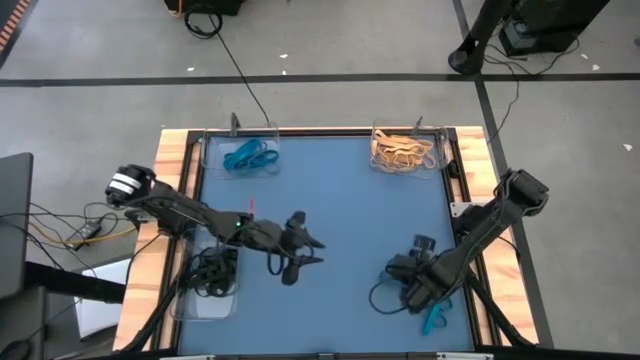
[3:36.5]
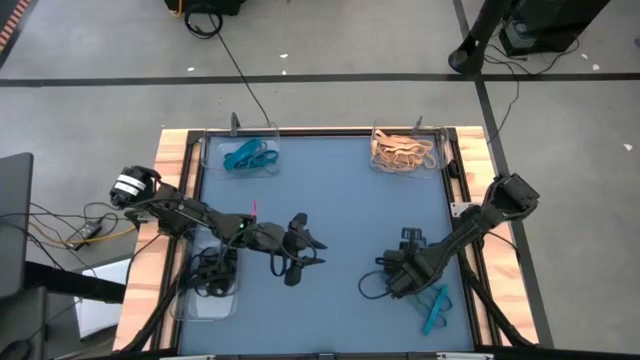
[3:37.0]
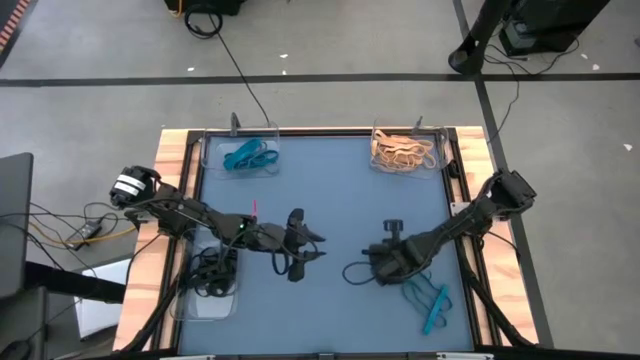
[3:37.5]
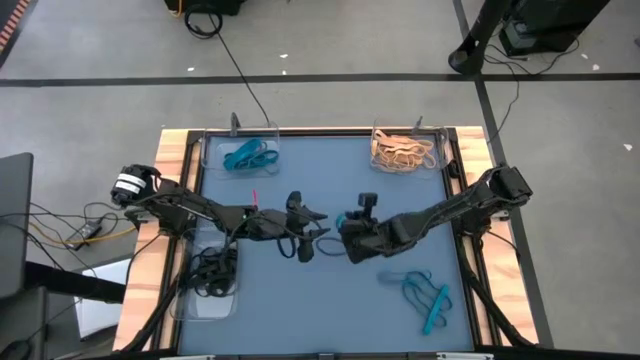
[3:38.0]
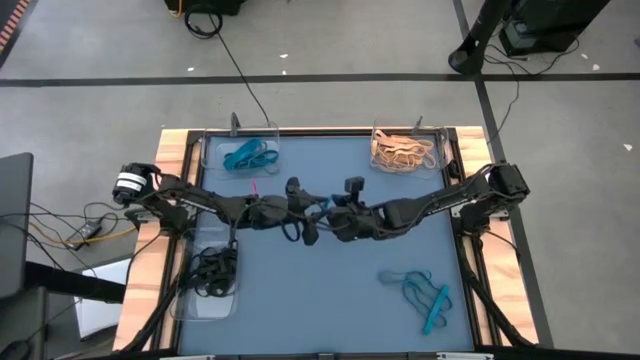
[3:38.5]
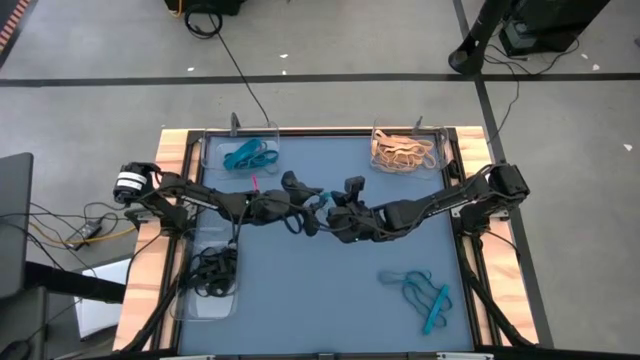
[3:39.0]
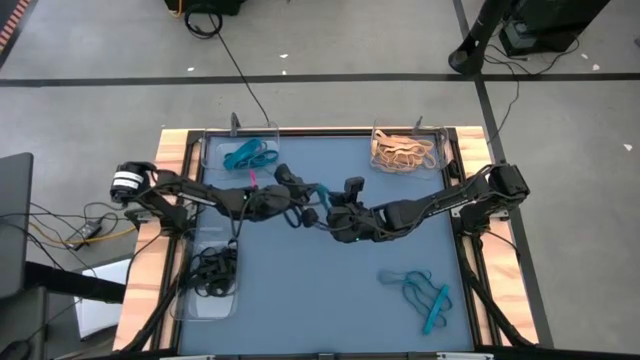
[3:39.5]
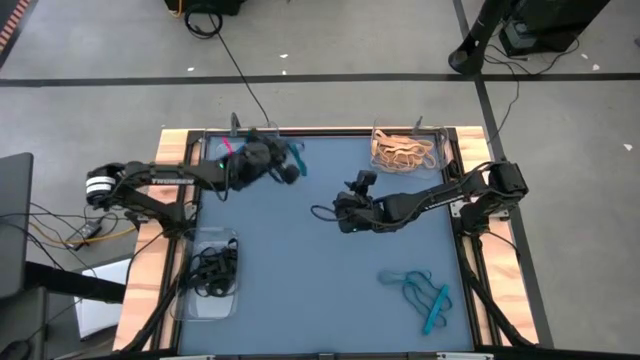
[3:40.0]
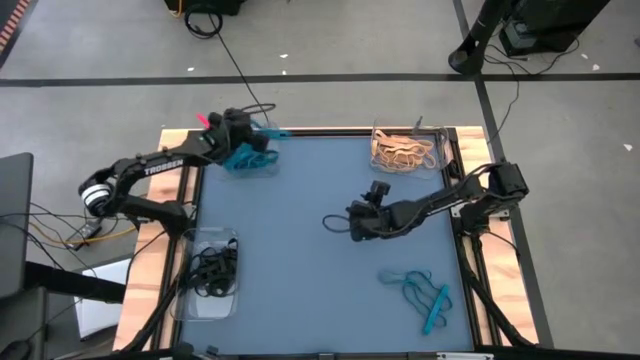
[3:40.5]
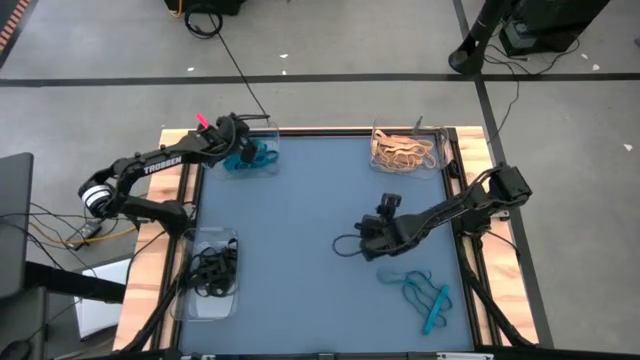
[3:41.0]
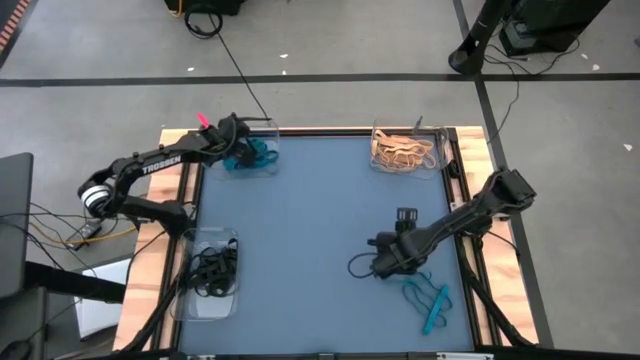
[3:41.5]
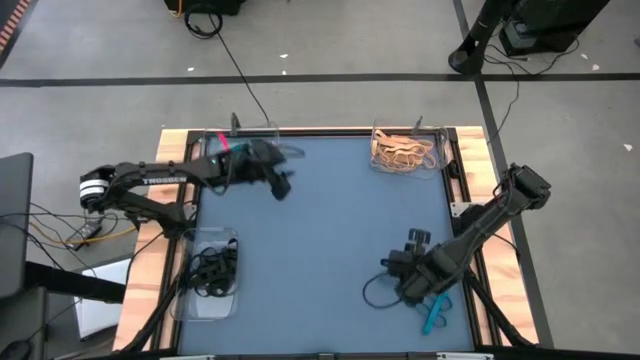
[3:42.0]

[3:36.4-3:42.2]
Task: Sort rubber bands into baskets
Put the blue rubber band into the top left transparent bin

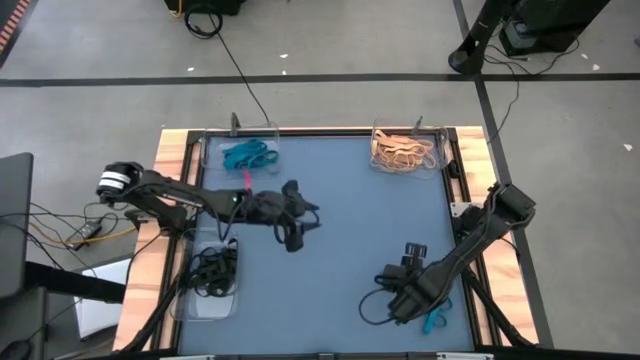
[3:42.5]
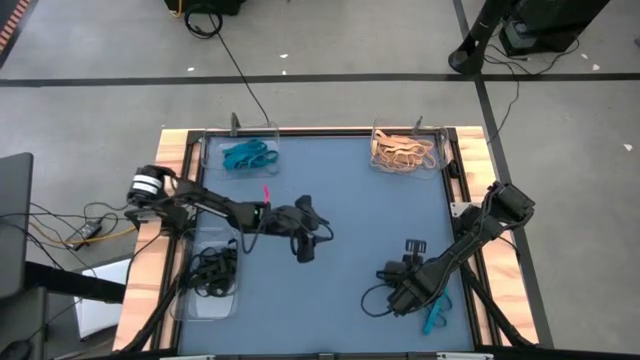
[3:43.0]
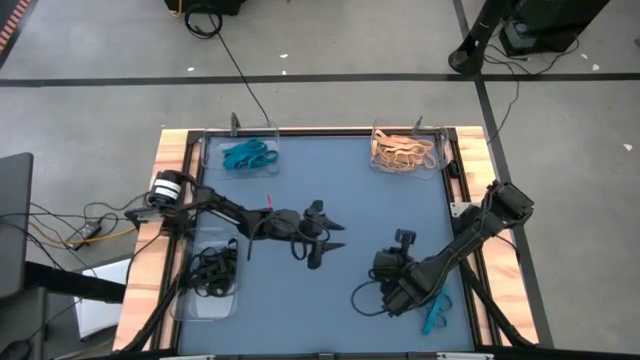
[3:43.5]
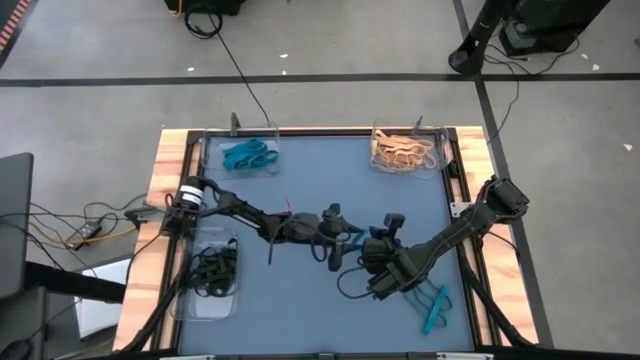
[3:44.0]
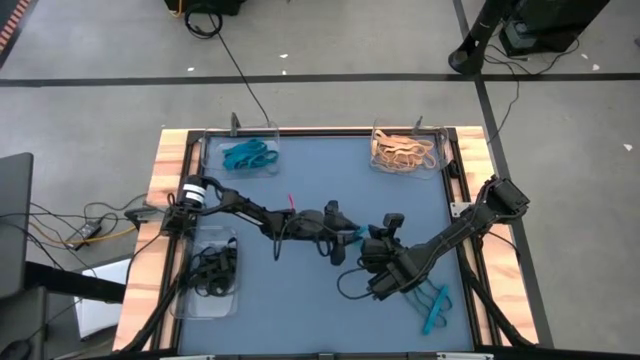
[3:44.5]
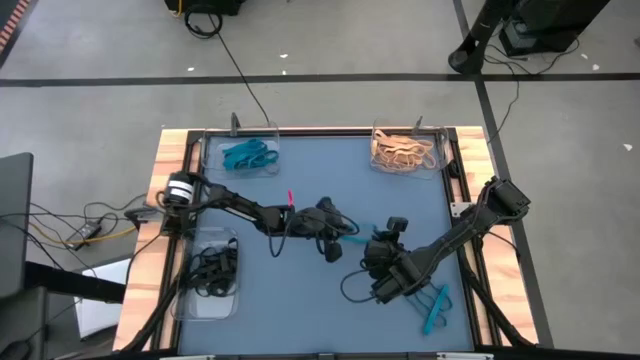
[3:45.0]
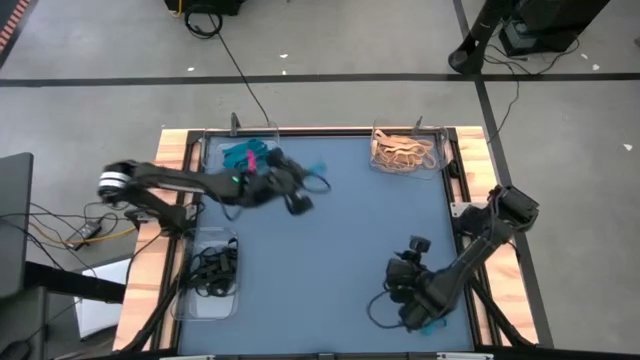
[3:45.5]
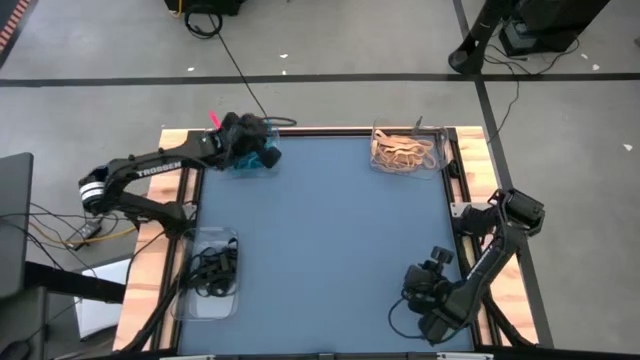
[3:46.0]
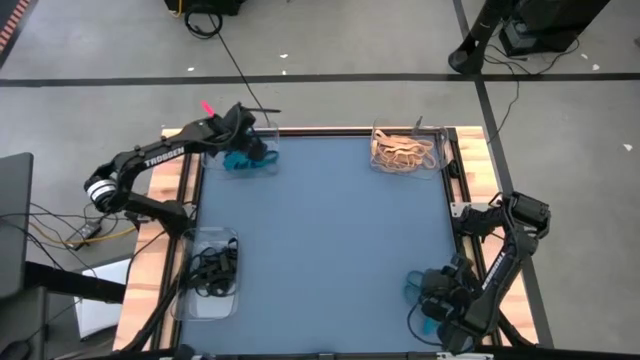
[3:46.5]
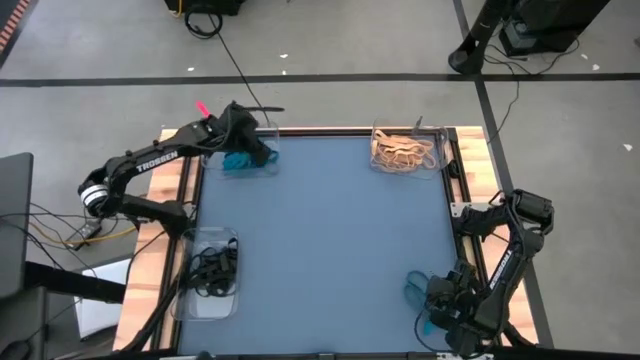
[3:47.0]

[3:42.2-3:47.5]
Put the blue rubber band into the top left transparent bin

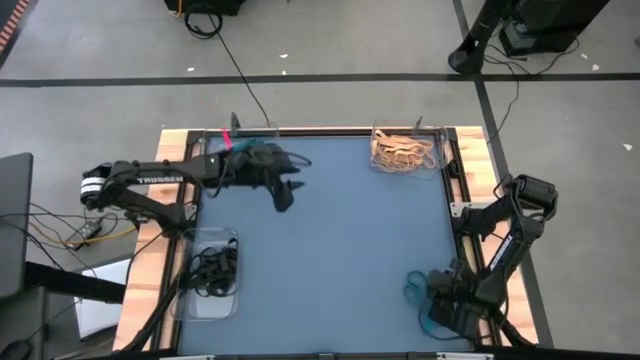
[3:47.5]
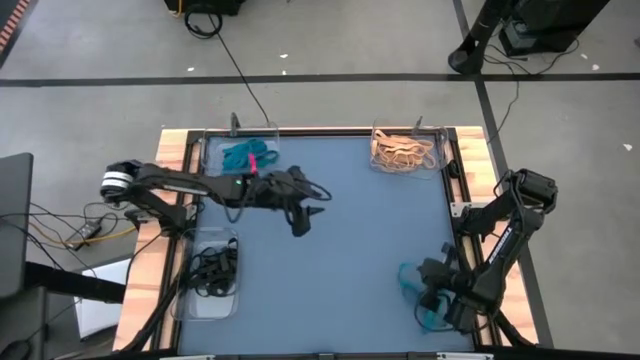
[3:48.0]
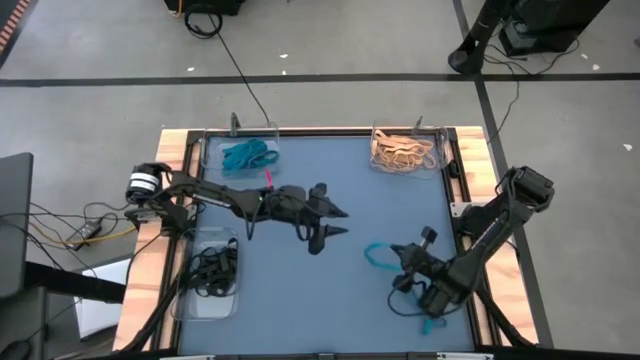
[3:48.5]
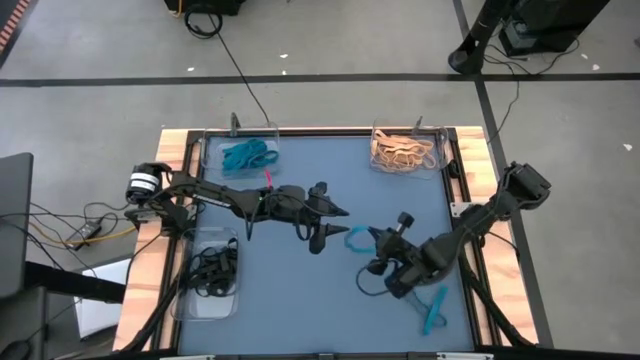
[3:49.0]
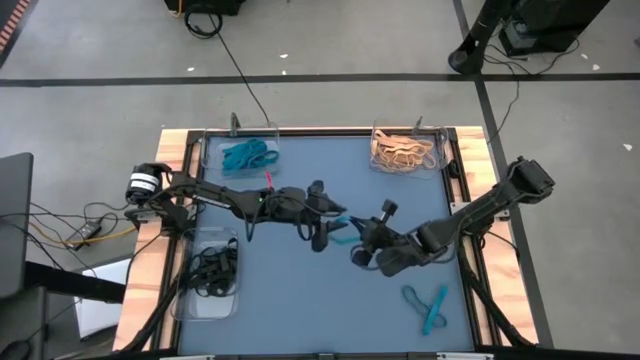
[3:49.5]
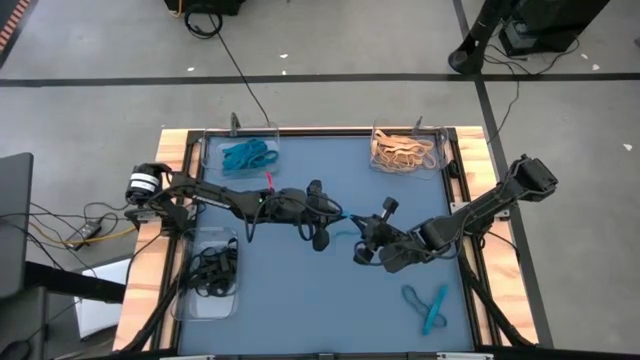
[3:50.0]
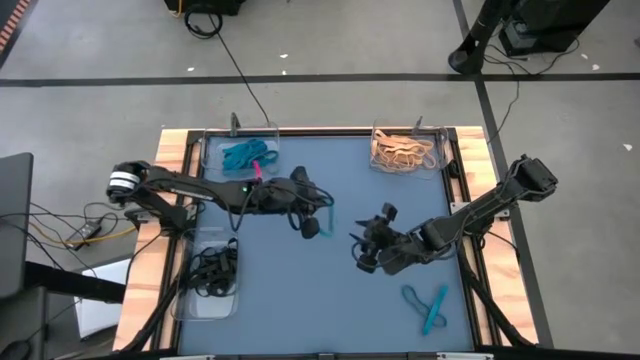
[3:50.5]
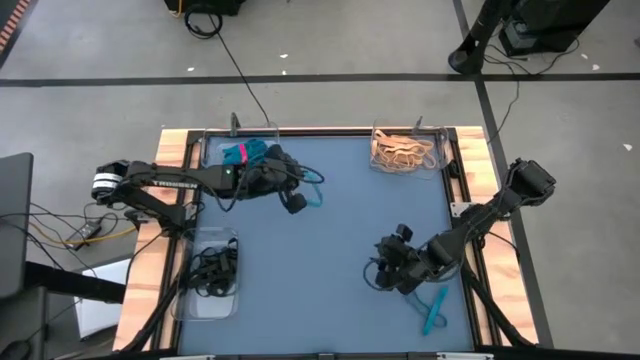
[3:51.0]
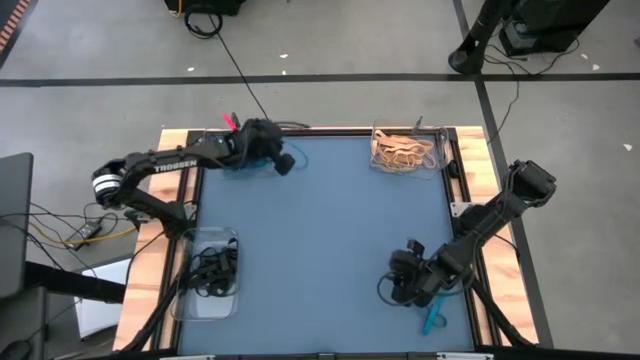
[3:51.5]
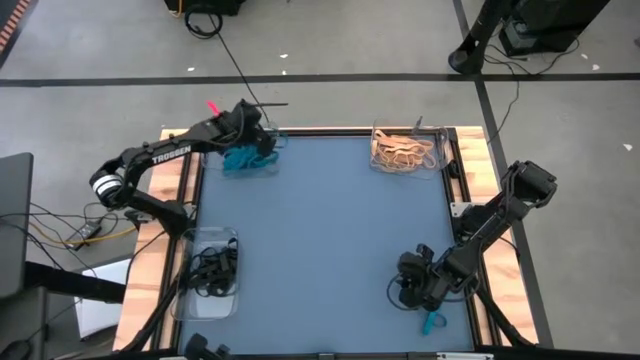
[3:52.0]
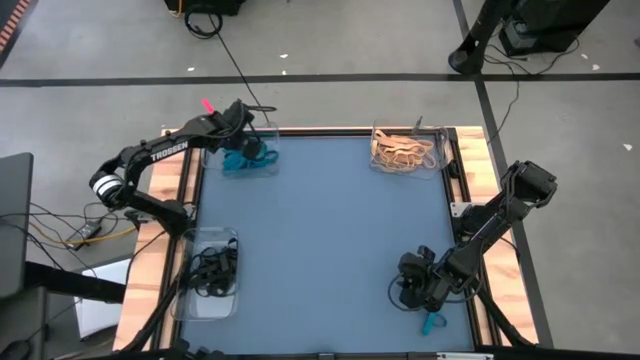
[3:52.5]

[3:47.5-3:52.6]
Put the blue rubber band into the top left transparent bin

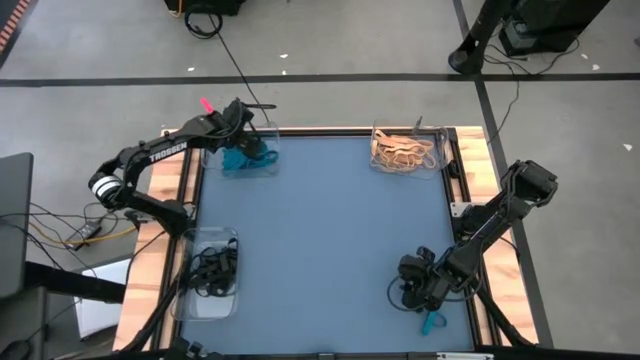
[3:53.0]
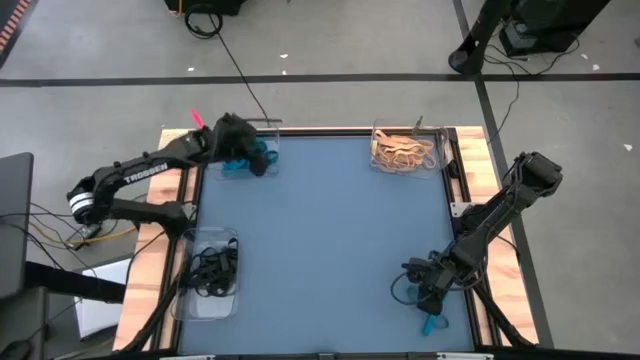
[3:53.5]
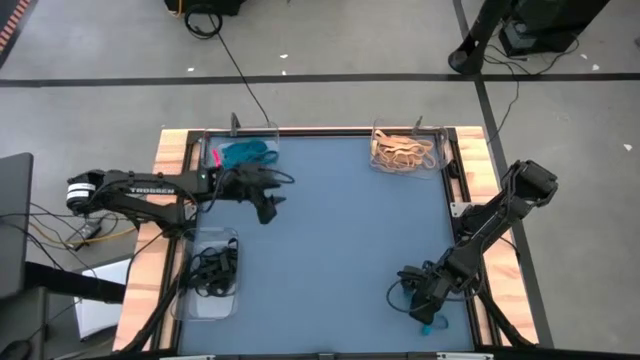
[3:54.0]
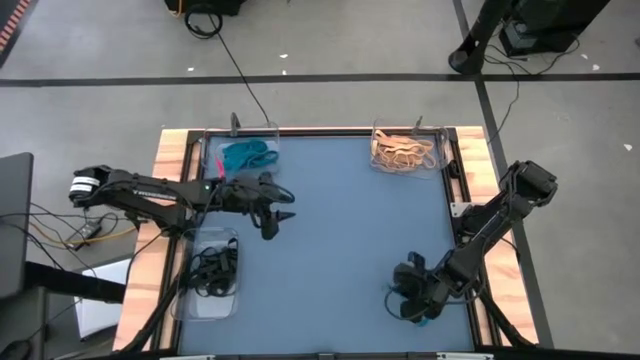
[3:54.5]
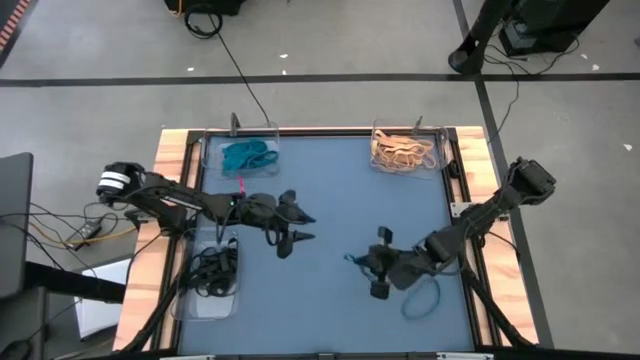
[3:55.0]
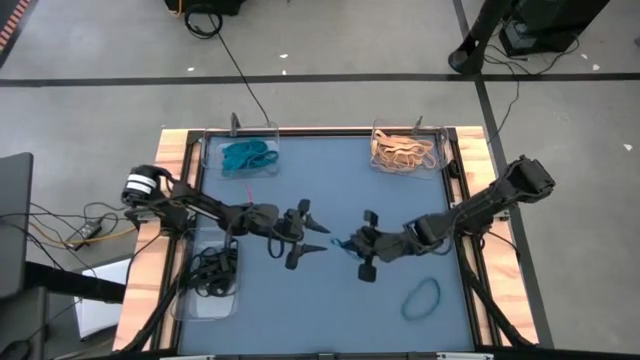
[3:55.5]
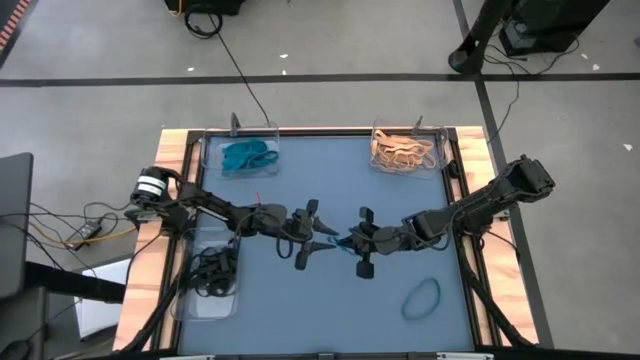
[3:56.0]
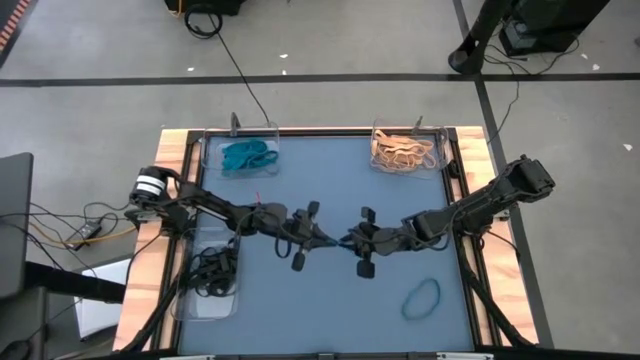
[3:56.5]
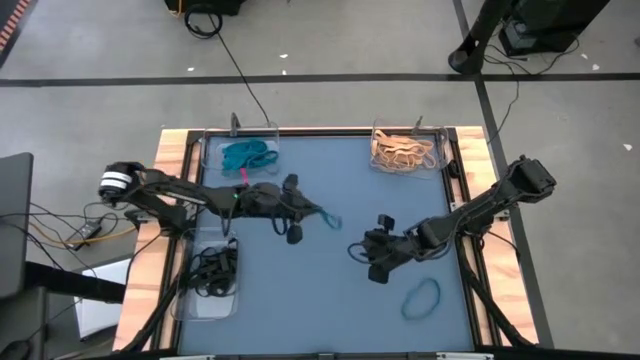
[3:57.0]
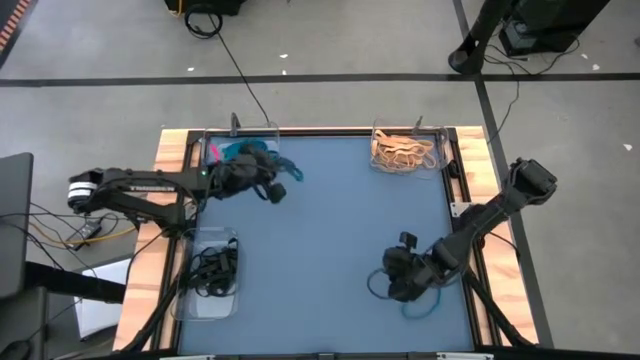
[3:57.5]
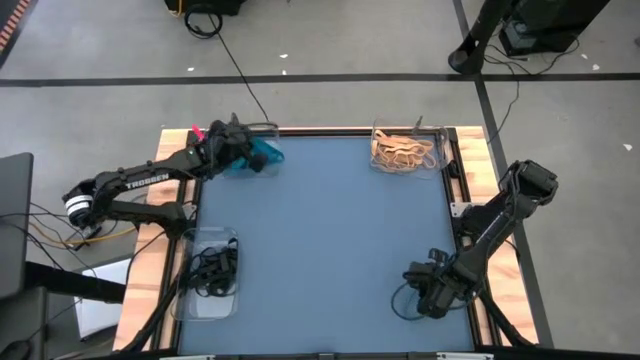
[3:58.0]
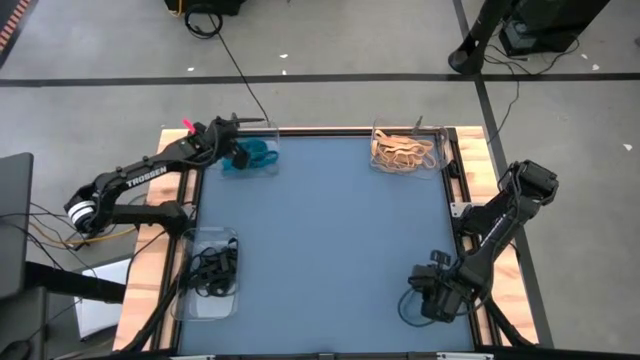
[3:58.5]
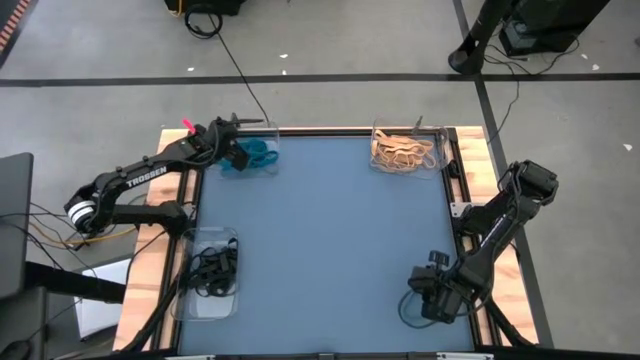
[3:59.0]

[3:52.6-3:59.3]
Put the blue rubber band into the top left transparent bin
